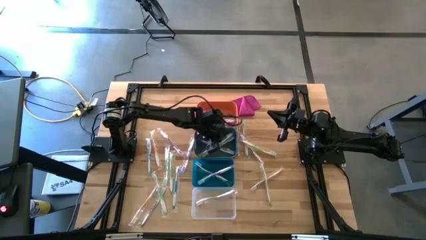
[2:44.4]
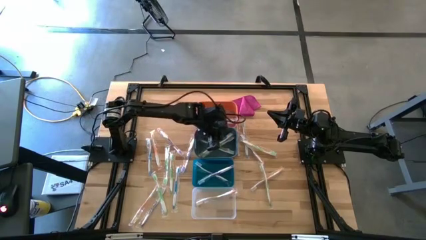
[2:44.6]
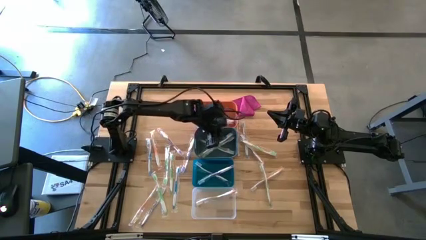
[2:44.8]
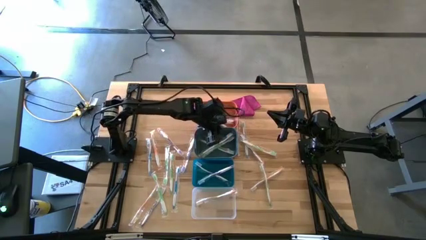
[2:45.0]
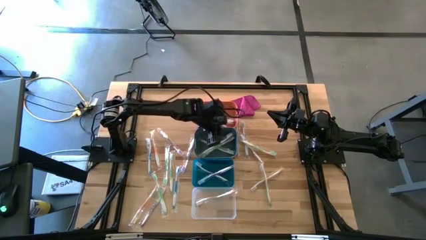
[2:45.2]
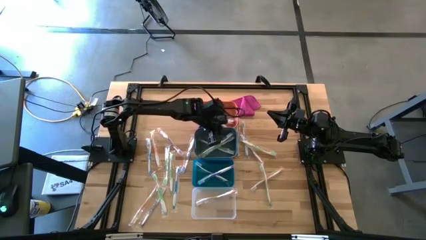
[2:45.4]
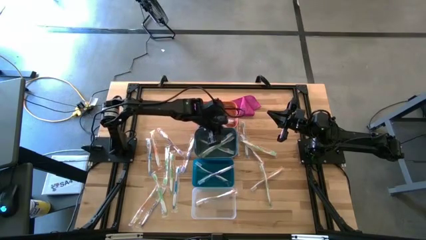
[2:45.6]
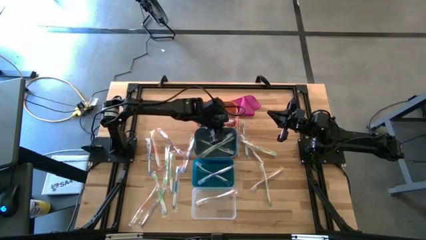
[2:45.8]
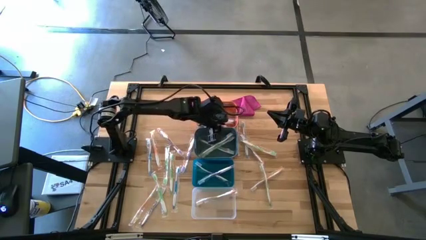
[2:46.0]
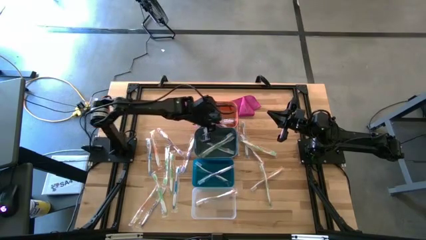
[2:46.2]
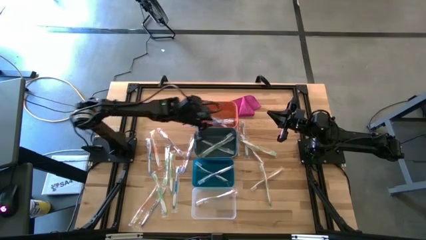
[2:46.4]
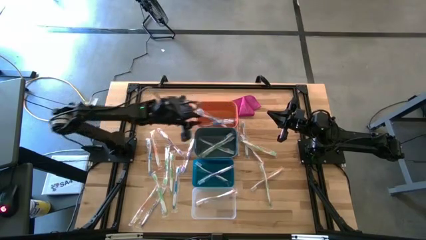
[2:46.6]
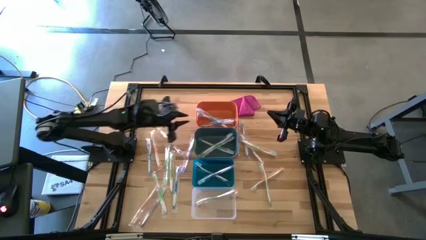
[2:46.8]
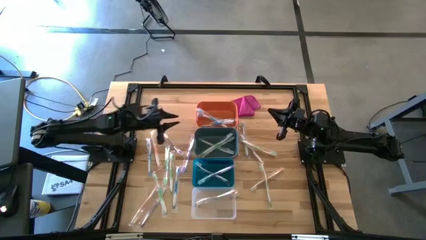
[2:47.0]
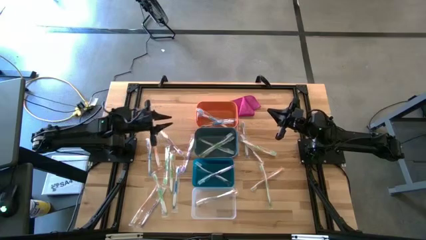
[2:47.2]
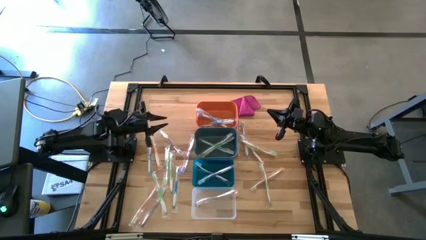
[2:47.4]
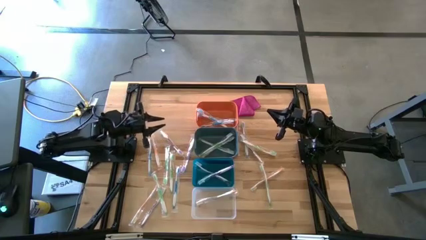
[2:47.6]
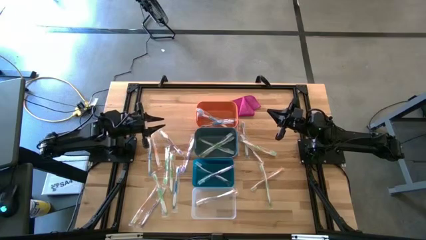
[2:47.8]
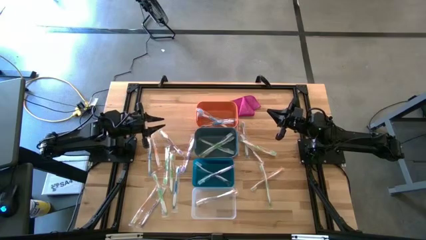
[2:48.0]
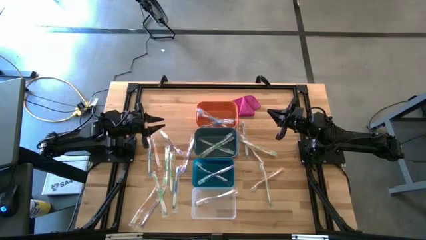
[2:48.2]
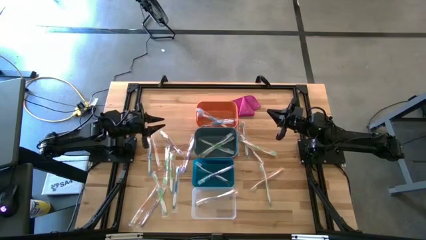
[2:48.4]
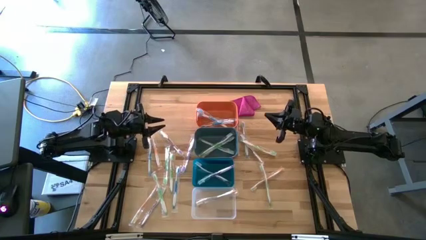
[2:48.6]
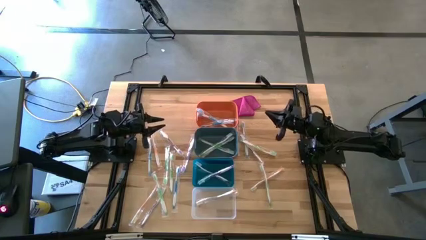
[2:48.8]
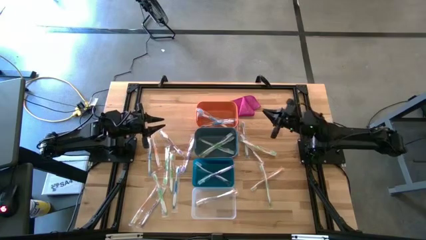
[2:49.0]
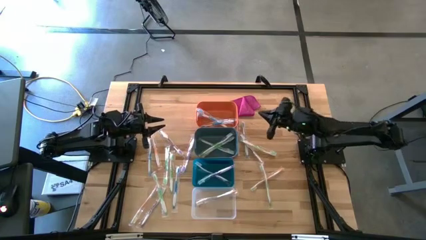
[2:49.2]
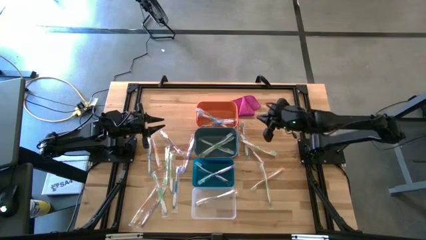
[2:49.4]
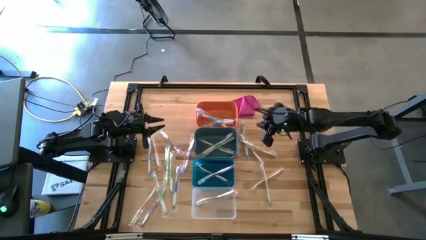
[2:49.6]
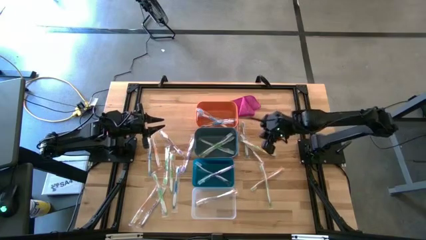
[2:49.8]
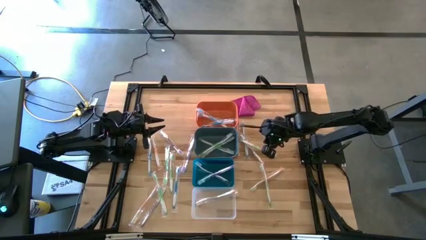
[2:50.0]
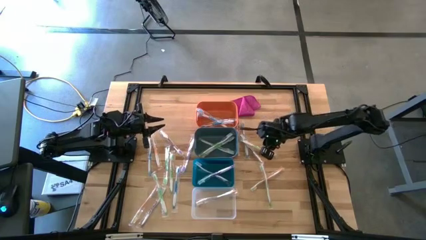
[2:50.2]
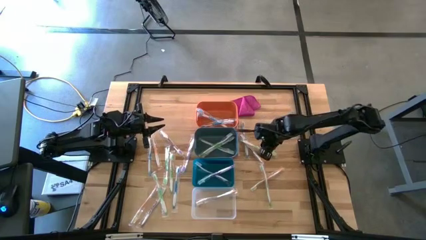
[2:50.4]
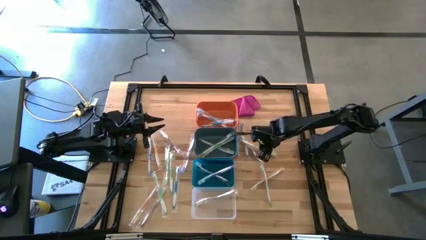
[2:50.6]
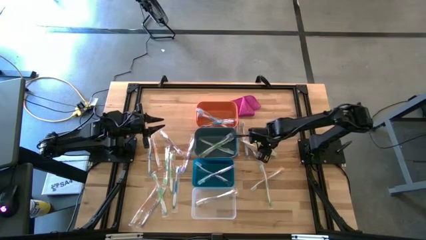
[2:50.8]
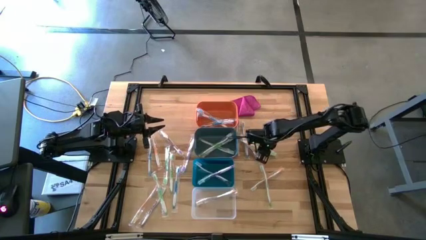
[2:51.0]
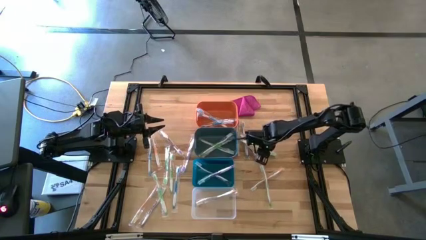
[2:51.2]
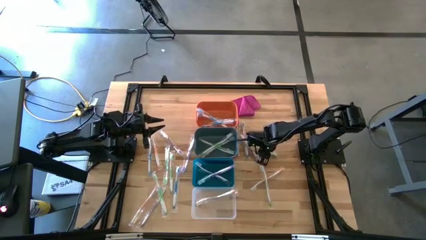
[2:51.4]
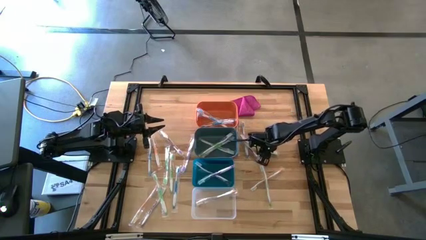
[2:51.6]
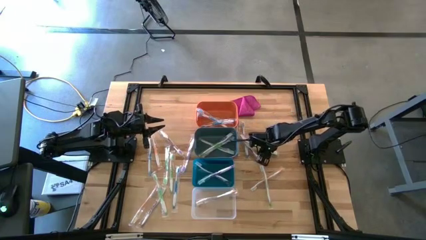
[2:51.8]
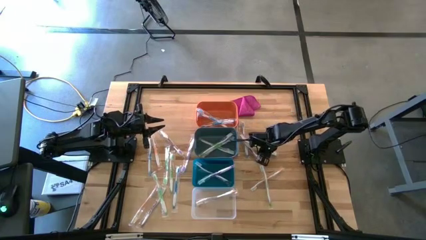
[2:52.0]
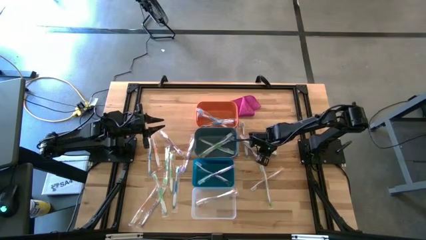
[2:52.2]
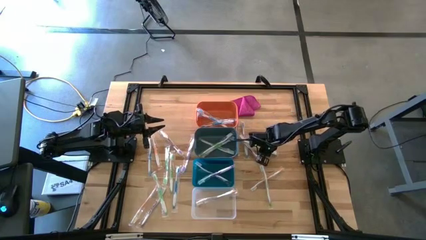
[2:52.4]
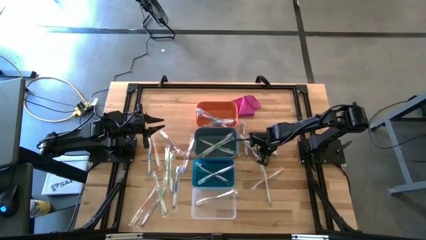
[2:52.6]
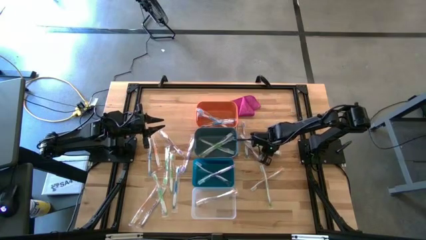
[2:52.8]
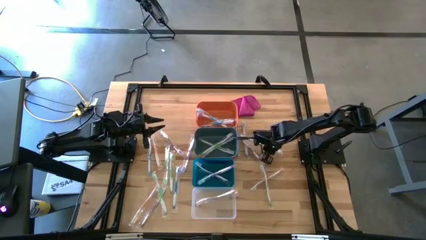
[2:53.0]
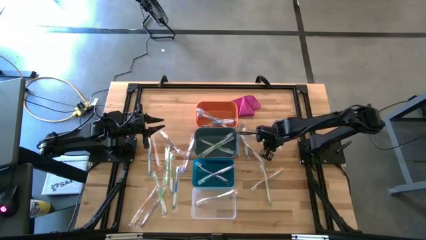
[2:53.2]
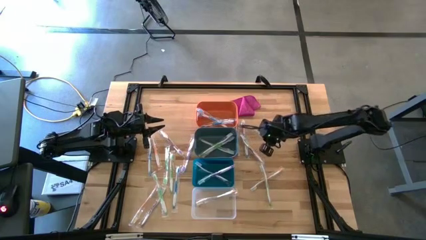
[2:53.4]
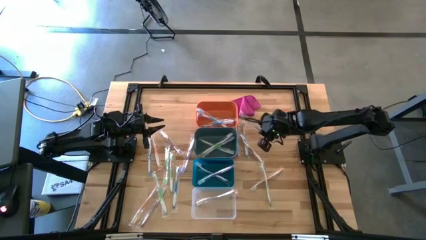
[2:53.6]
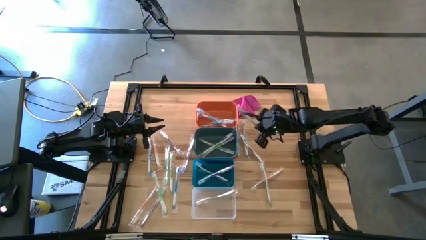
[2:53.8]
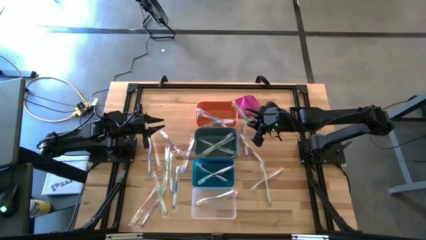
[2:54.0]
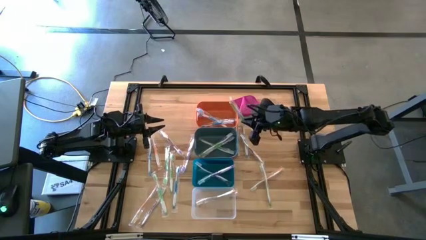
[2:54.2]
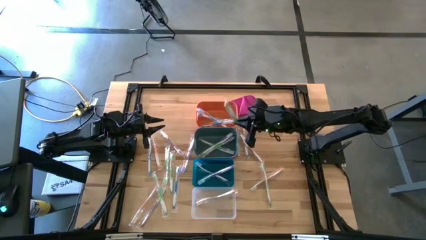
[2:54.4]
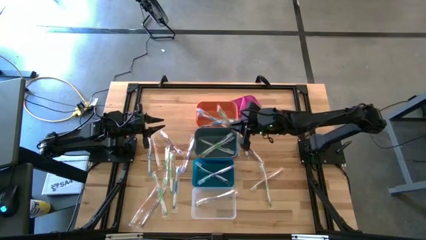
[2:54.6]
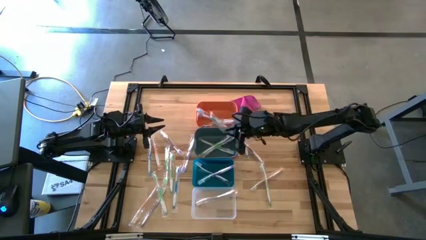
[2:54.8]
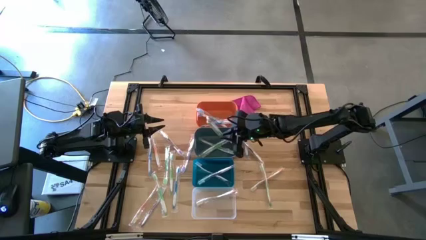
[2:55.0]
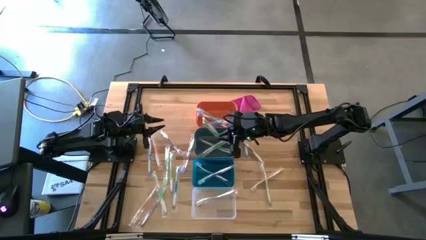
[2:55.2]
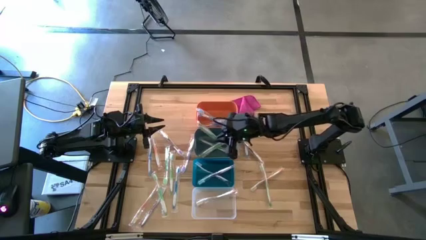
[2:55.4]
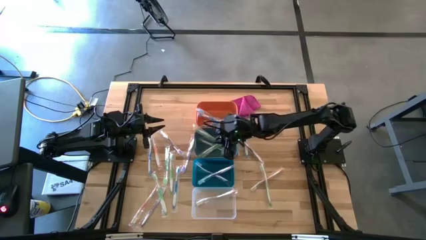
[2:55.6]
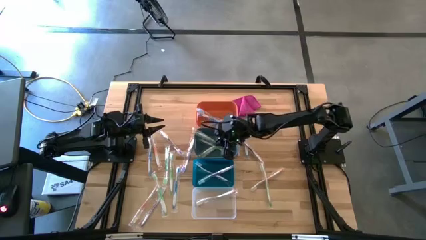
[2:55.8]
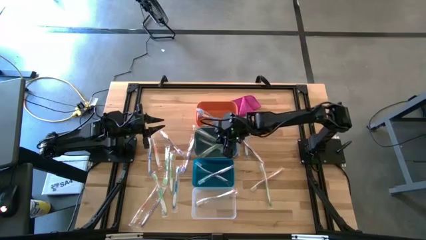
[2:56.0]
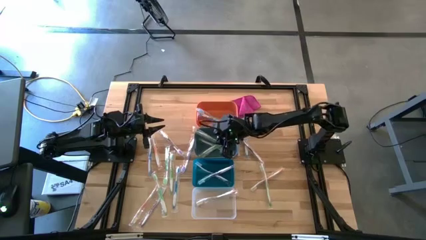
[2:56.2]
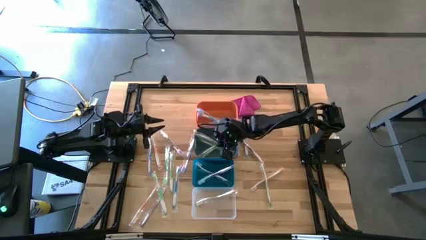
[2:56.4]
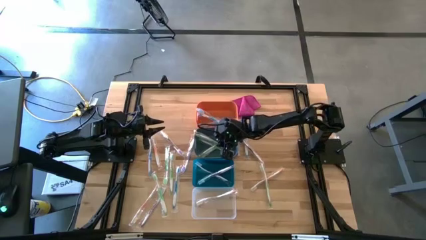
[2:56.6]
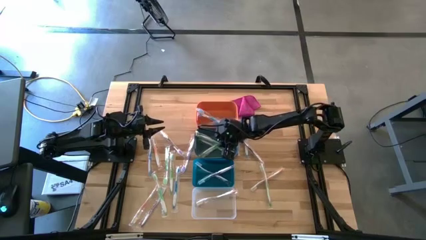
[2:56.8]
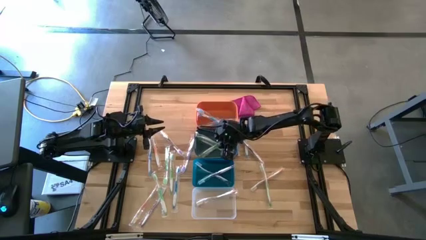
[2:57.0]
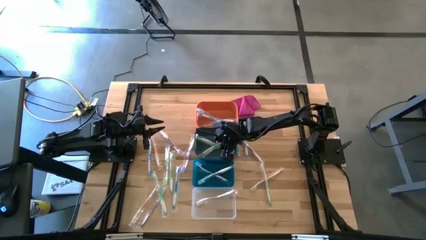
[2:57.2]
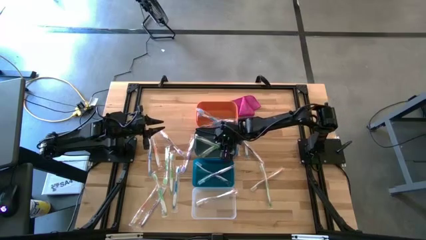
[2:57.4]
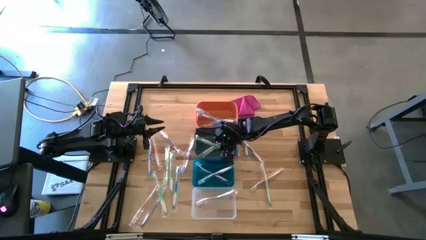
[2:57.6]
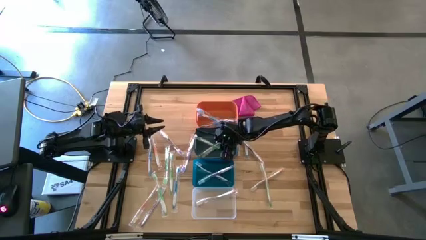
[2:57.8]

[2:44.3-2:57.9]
Task: Pick & Place Toothbrushes
Put the green toothbrush into the green bin

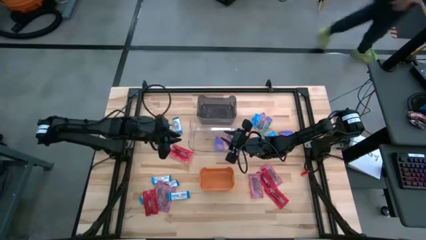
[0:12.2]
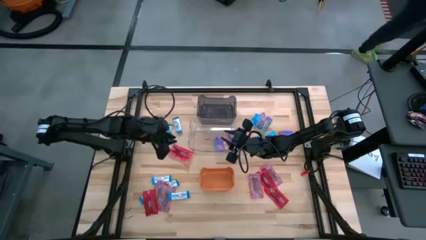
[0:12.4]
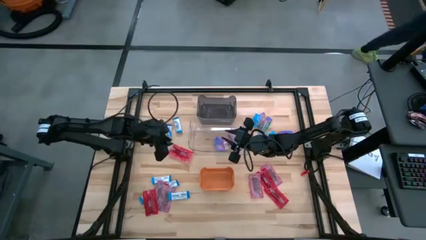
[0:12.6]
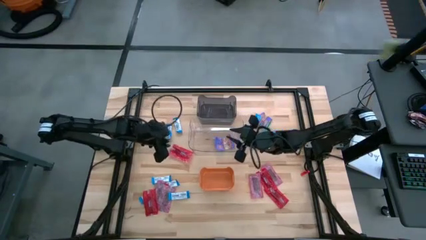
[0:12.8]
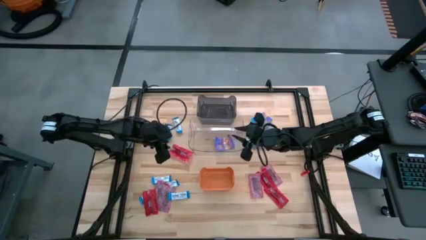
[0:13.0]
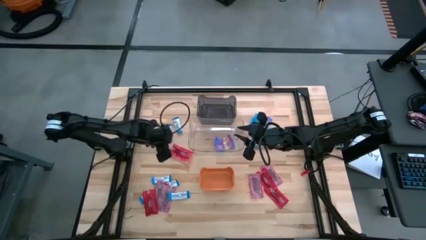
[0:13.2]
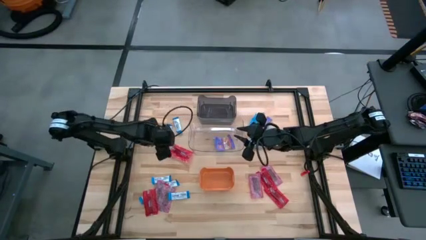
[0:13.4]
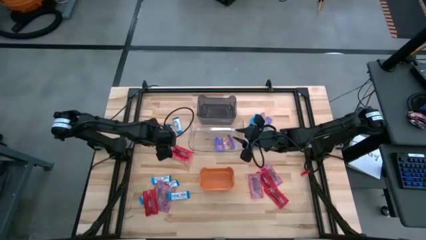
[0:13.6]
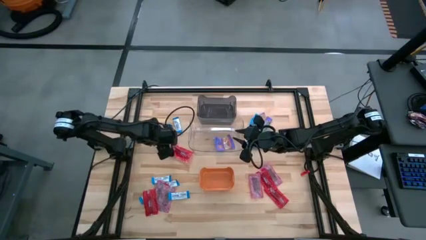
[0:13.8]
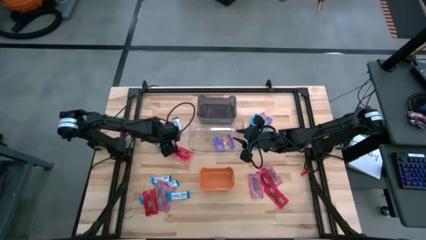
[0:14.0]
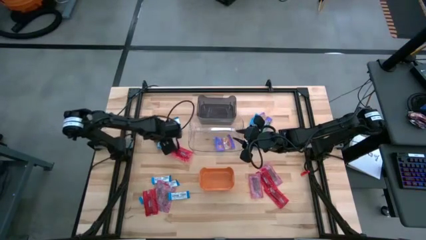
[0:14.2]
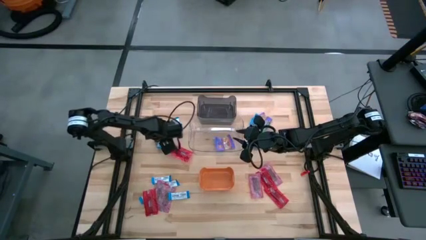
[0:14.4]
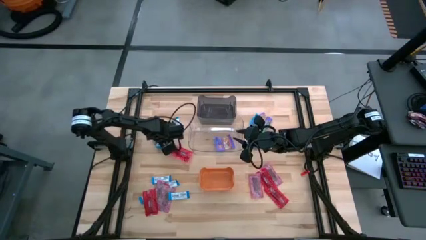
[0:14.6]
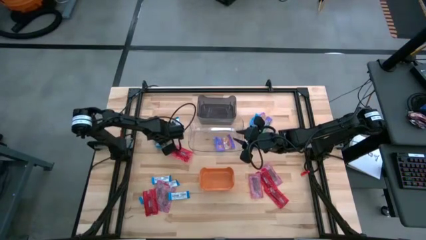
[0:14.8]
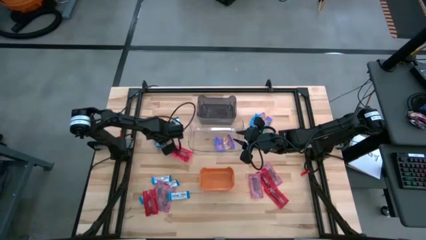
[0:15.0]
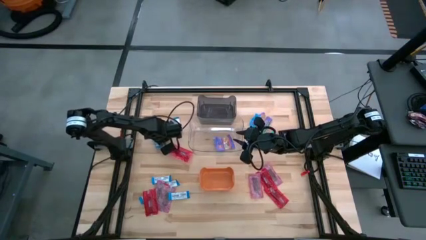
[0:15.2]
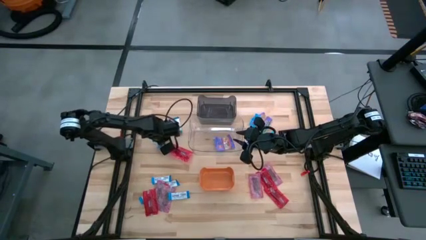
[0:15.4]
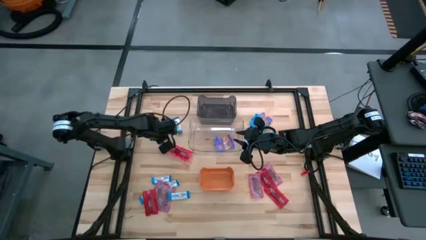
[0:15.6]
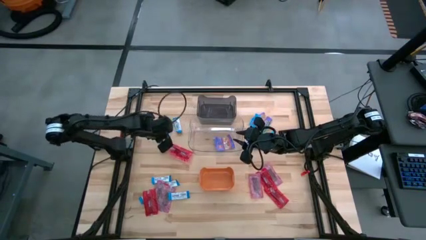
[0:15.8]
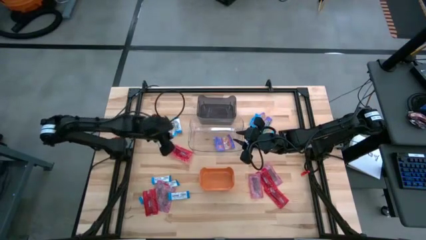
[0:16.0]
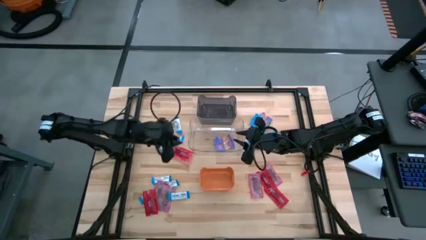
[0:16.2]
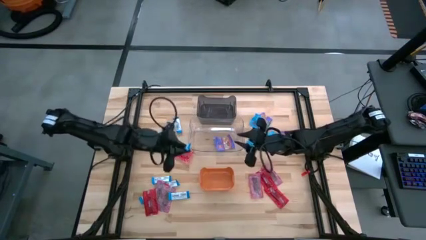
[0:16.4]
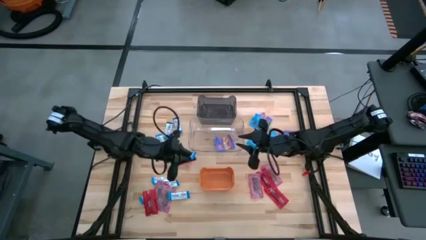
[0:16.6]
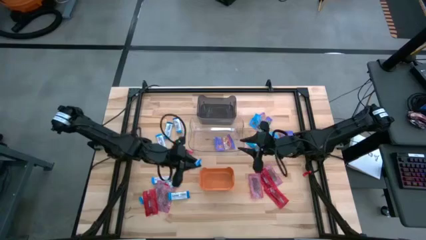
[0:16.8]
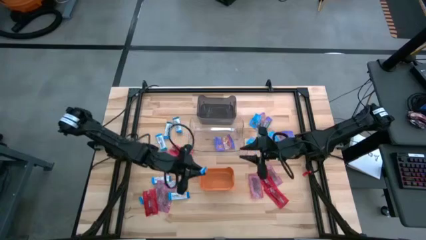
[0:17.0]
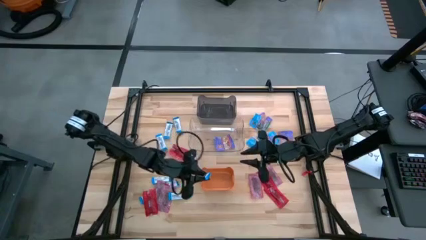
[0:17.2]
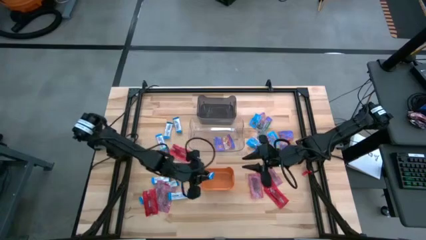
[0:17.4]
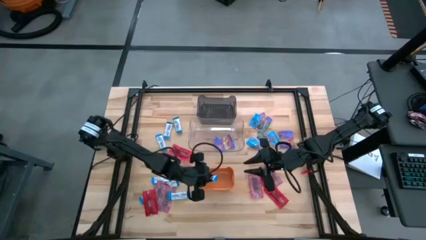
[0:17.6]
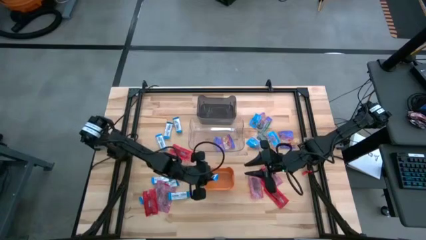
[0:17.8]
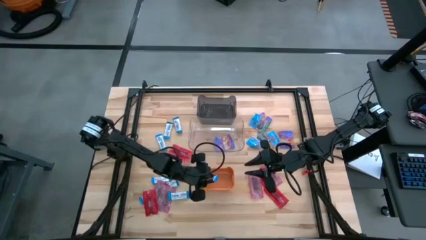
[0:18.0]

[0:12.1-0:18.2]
Task: Sort candy
Put the white chocolate bar into the orange bin
